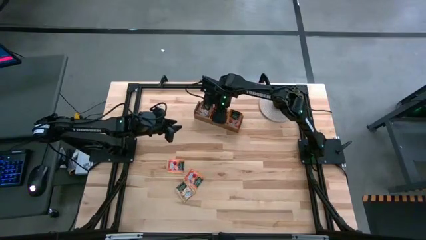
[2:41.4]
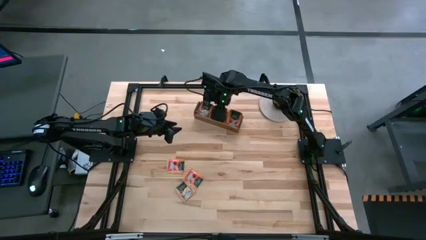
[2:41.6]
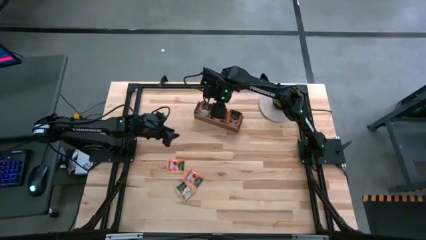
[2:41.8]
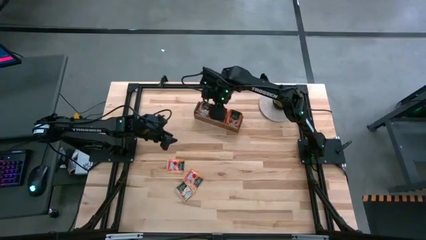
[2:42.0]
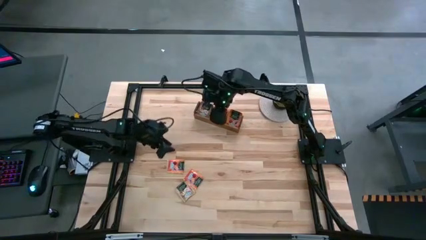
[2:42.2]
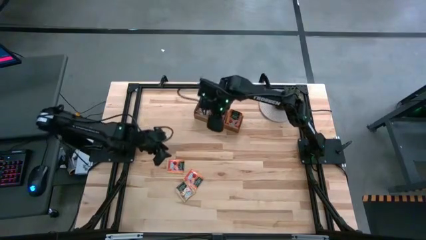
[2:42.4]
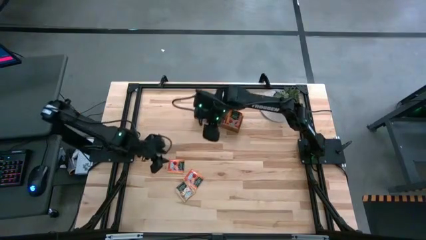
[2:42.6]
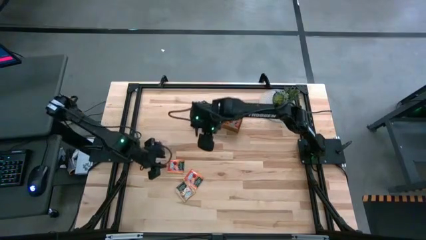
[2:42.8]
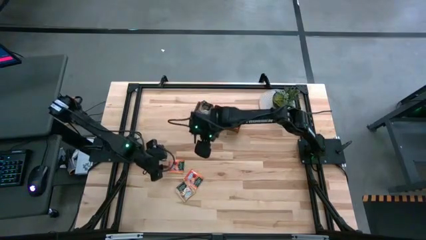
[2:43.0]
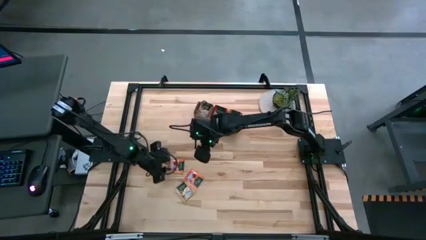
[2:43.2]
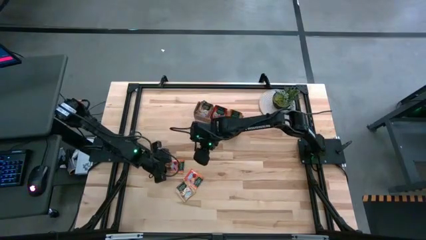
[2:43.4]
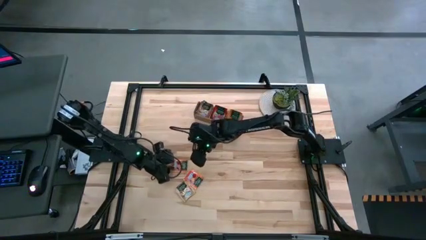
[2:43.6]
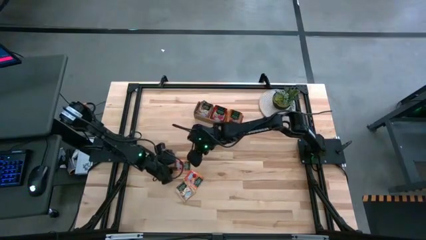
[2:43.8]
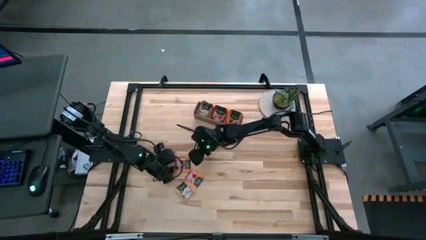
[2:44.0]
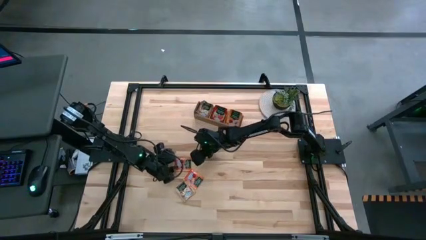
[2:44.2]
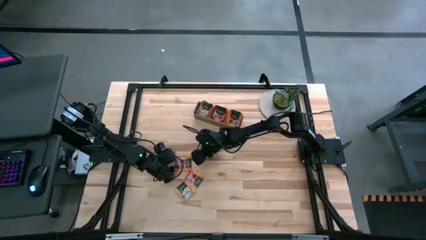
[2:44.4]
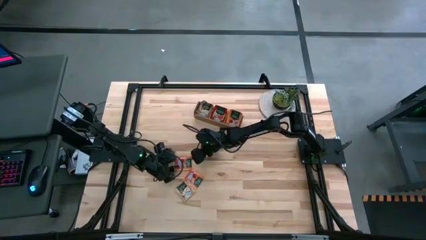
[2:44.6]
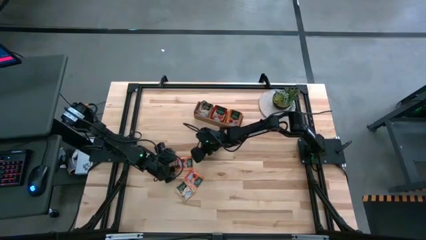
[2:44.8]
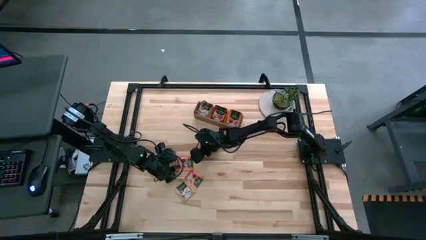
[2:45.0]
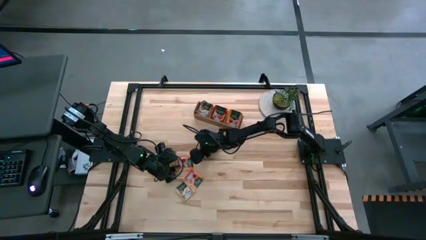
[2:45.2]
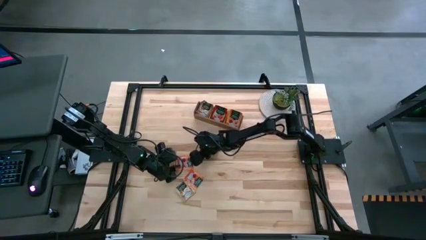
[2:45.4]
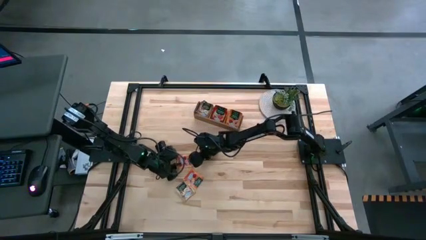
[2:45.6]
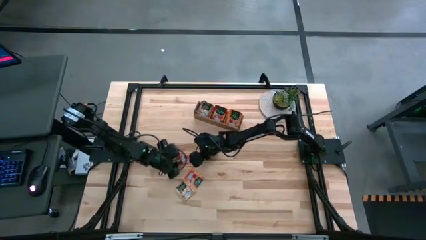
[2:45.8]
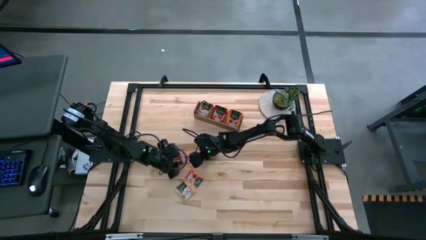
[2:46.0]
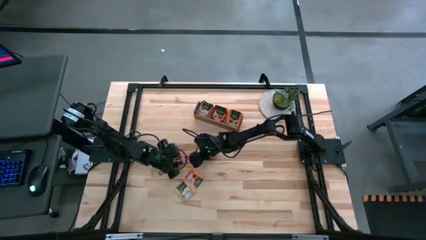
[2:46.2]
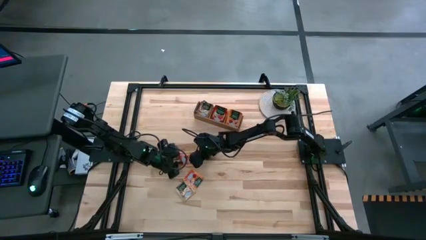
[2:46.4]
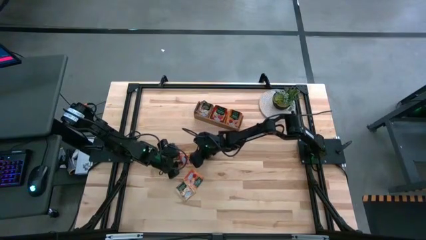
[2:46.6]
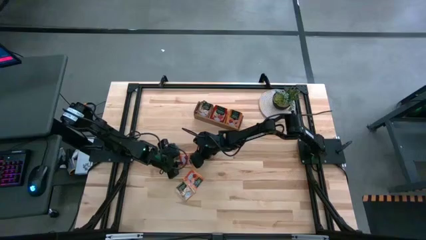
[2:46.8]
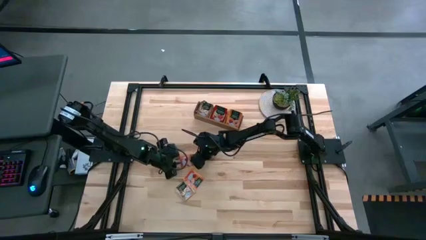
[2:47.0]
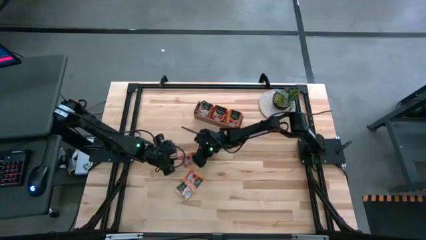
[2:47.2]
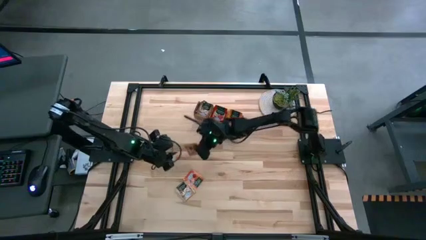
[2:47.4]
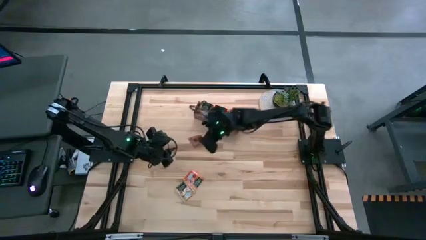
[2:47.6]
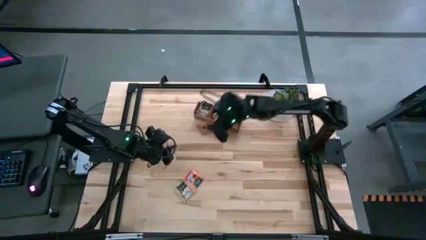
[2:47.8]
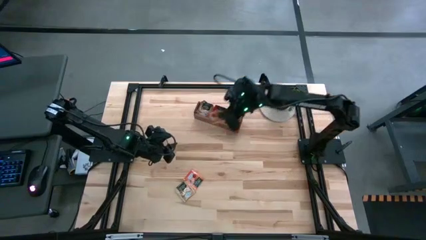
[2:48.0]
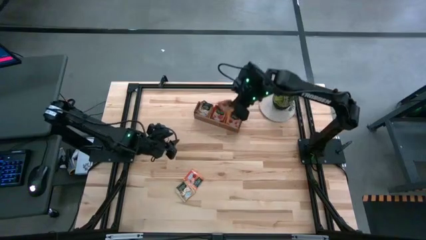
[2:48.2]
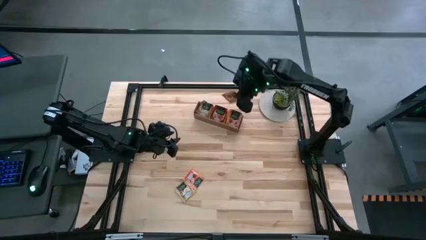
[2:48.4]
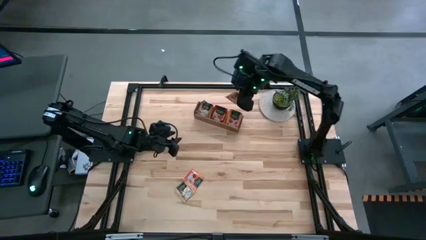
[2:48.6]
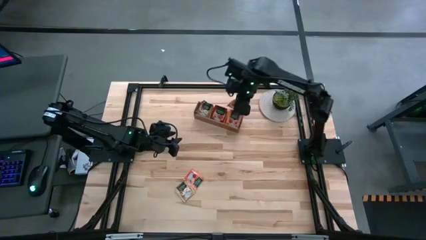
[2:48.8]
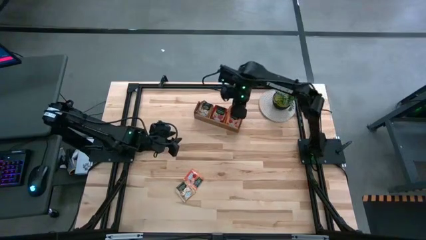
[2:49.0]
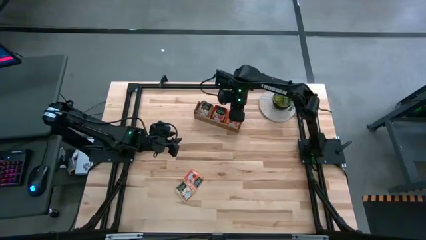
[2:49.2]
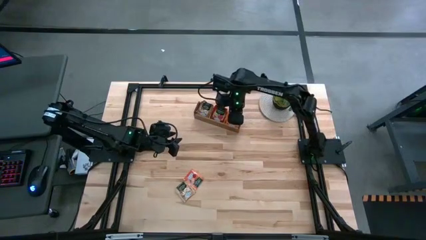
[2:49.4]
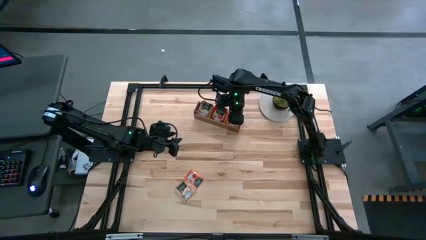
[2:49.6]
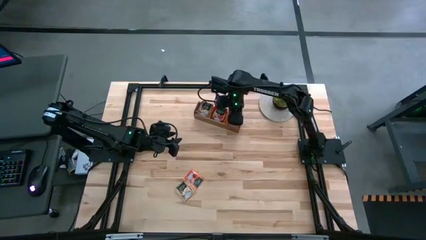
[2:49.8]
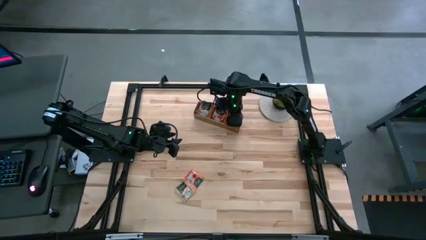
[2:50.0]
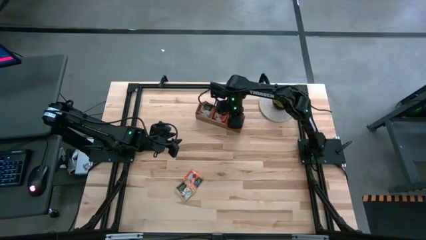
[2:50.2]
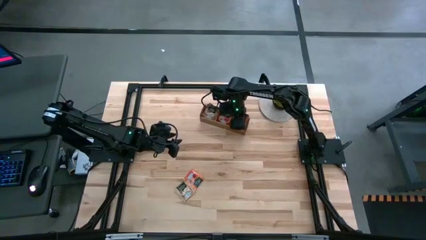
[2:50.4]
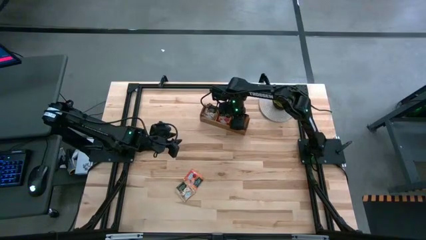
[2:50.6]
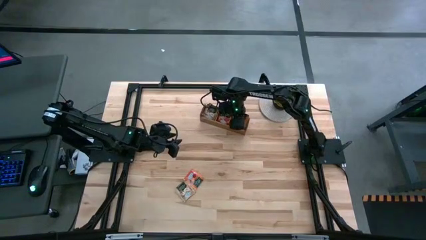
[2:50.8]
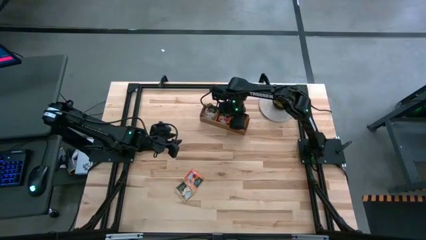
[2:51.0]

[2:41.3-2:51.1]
Task: Pick & Place Tea
Put the orange tea bag into the right section of the wooden organizer

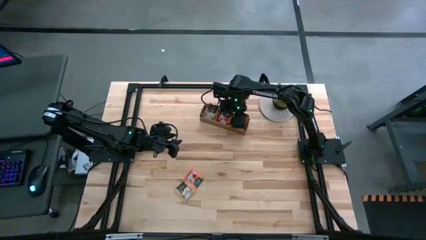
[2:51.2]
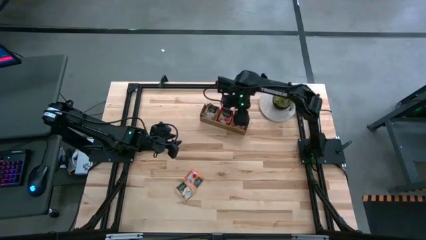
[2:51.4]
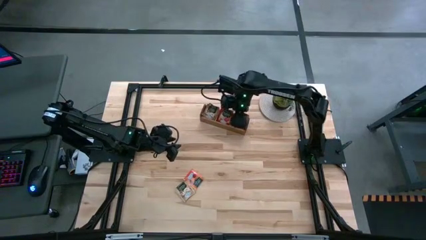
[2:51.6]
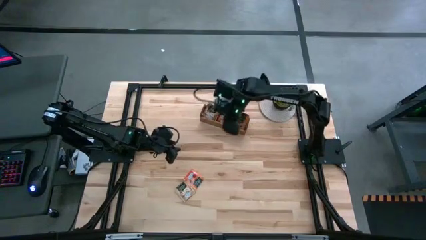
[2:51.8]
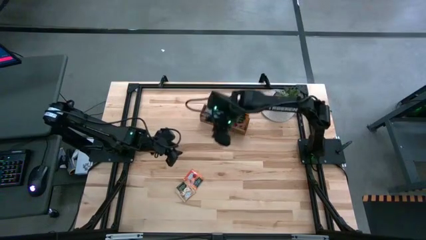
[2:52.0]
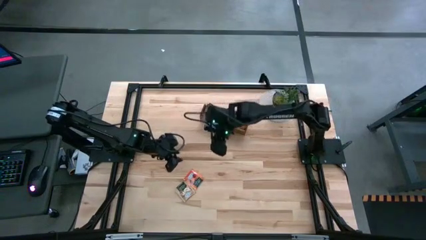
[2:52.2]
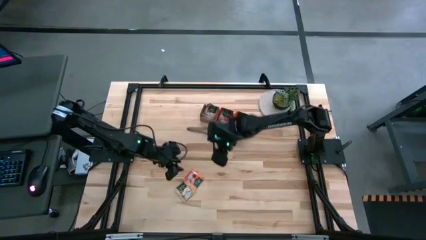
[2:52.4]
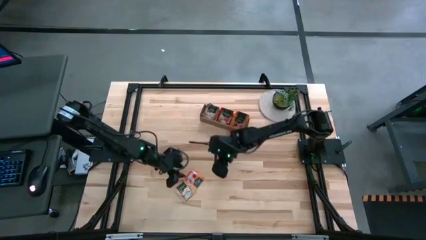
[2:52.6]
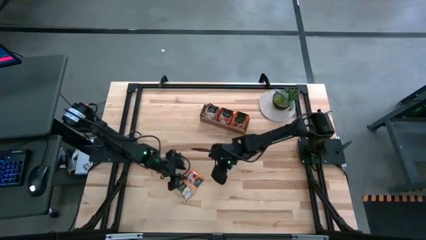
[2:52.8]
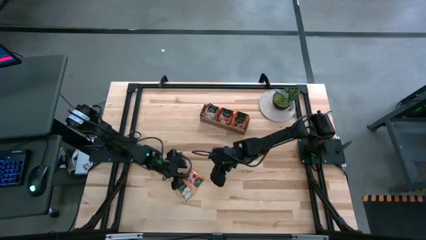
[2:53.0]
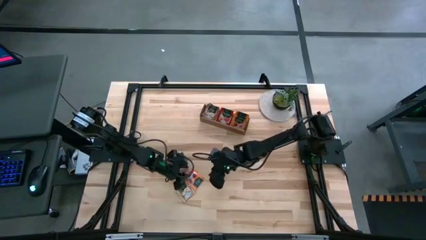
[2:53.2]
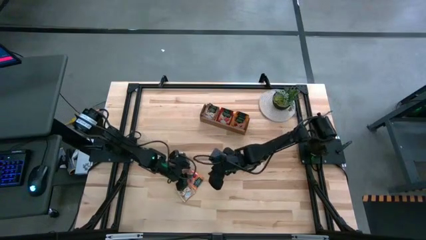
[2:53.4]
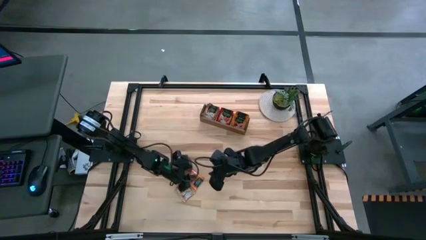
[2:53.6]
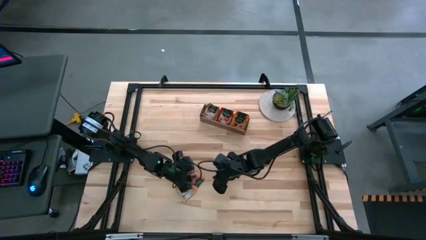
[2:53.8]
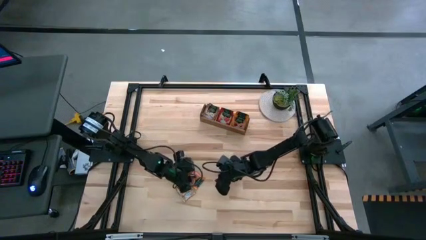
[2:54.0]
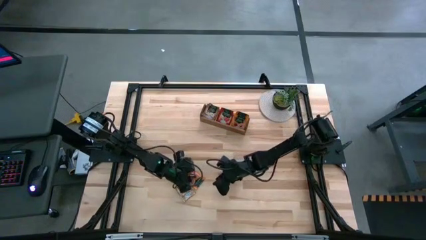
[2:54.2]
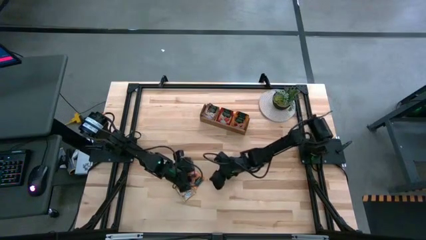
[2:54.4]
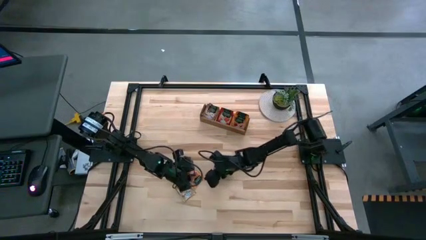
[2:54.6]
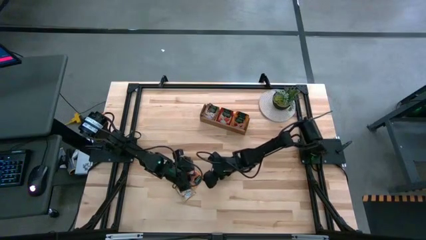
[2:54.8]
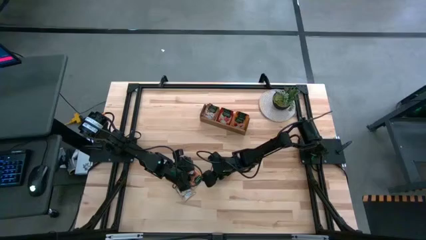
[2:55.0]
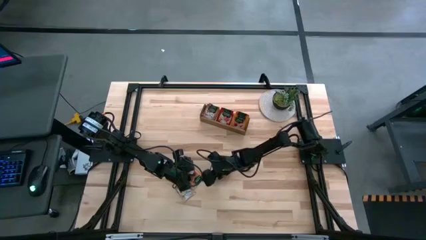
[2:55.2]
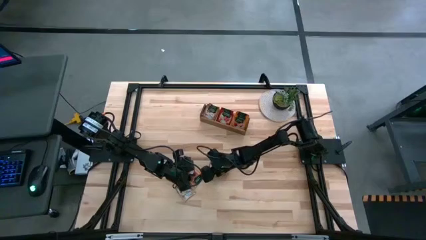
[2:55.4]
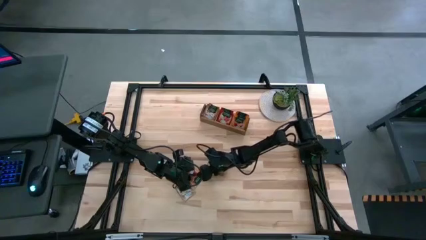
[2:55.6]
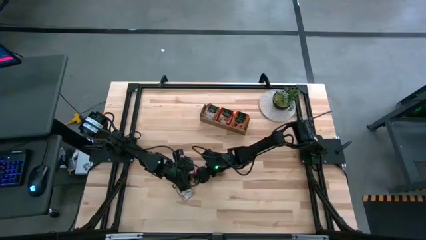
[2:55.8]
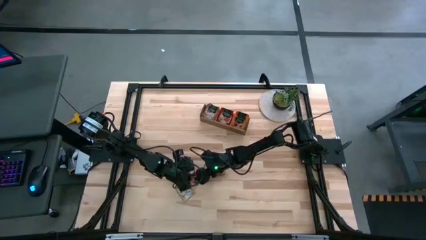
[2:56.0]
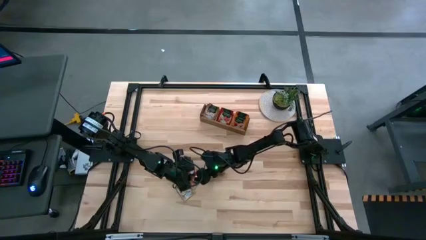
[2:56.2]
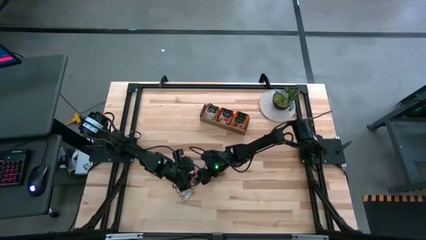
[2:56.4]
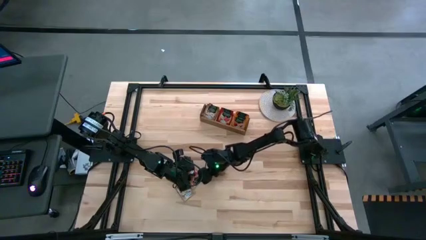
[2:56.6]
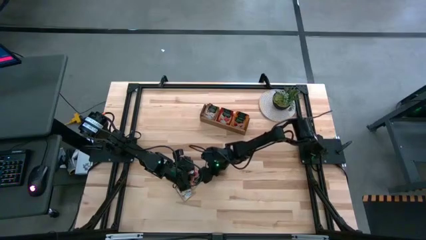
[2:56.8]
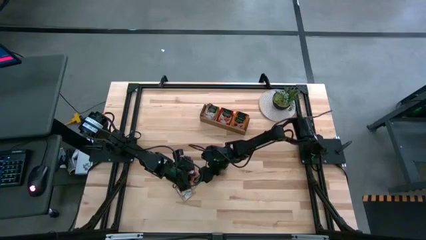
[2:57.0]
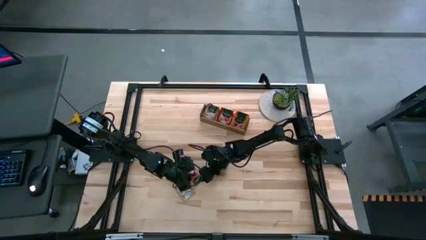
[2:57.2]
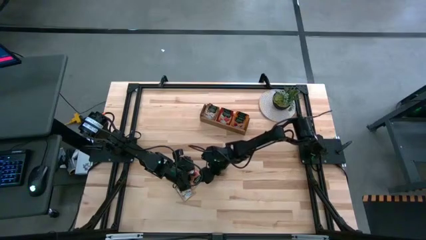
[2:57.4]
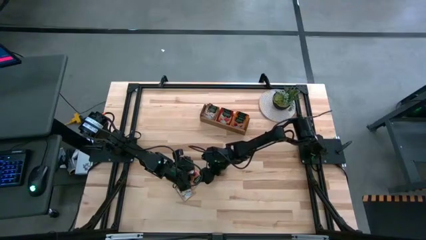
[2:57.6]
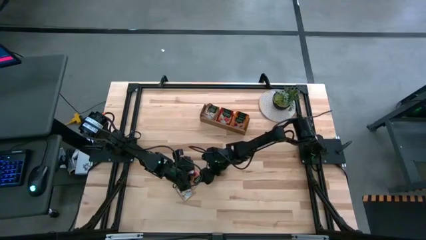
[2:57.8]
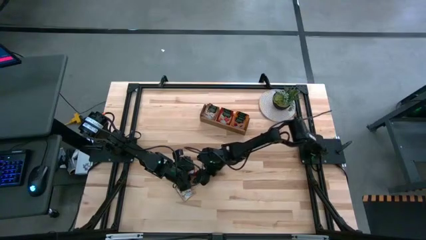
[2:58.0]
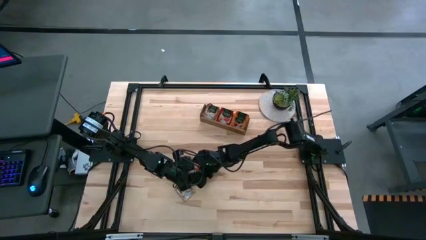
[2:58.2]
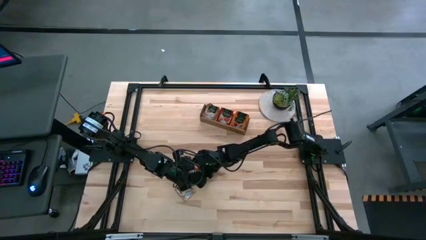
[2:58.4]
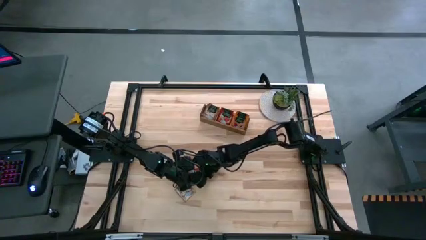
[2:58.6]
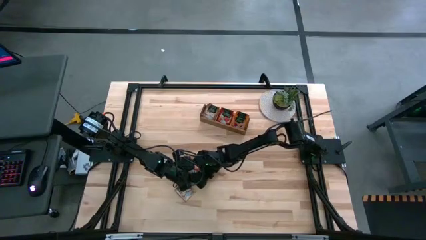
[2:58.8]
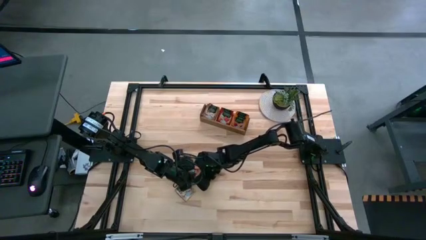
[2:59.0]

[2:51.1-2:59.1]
Put the orange tea bag into the right section of the wooden organizer
